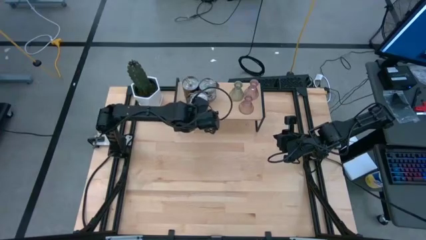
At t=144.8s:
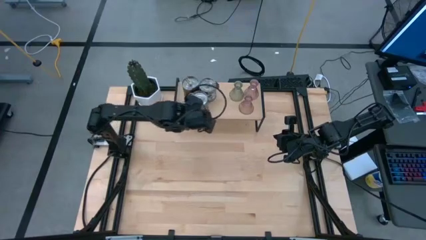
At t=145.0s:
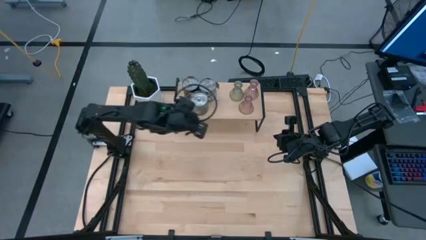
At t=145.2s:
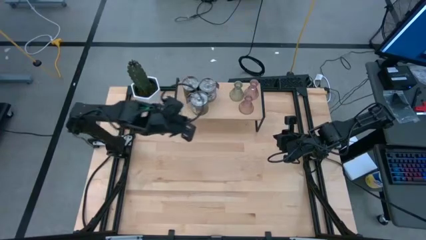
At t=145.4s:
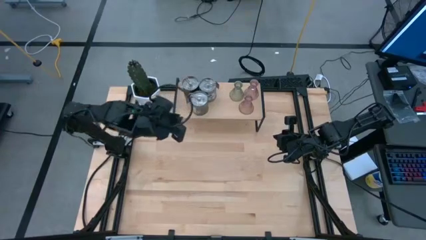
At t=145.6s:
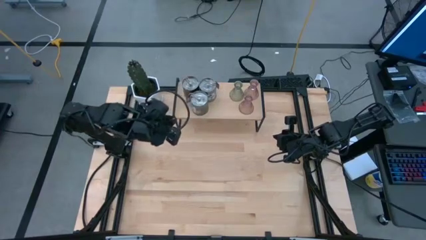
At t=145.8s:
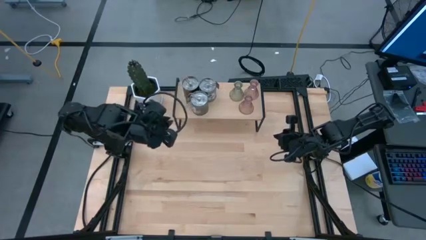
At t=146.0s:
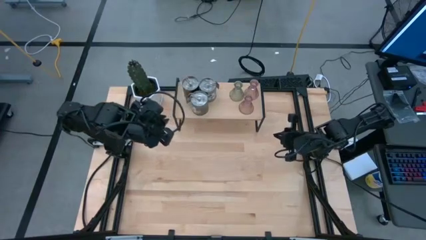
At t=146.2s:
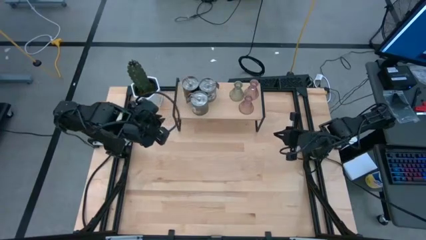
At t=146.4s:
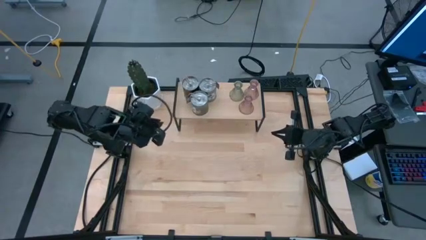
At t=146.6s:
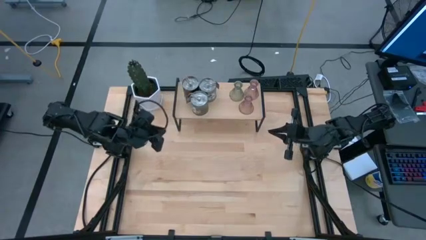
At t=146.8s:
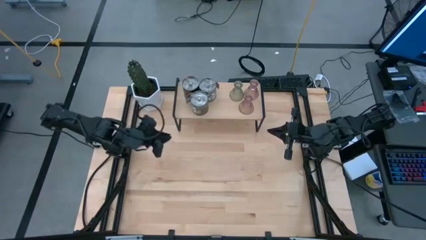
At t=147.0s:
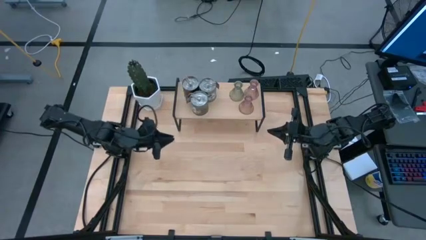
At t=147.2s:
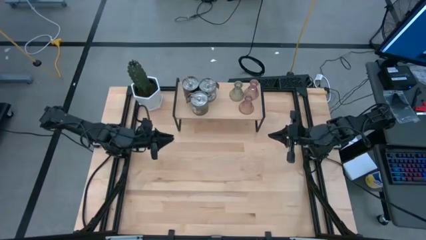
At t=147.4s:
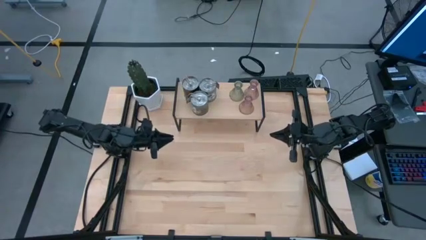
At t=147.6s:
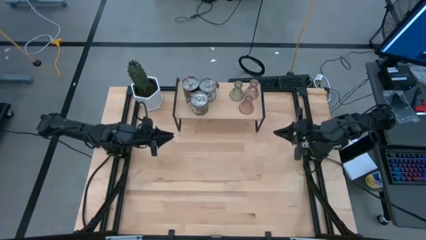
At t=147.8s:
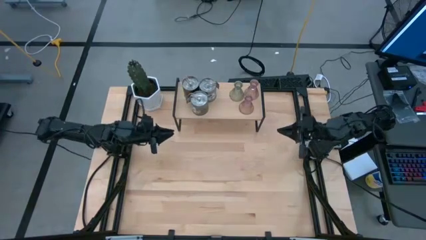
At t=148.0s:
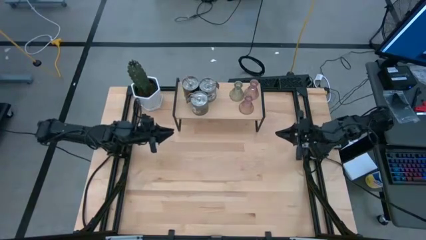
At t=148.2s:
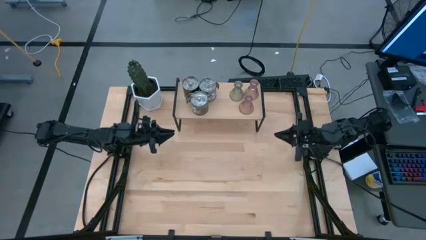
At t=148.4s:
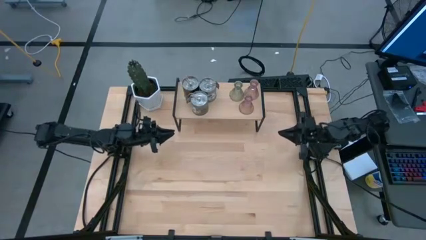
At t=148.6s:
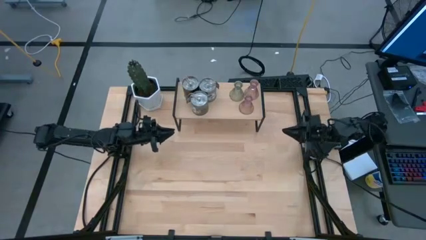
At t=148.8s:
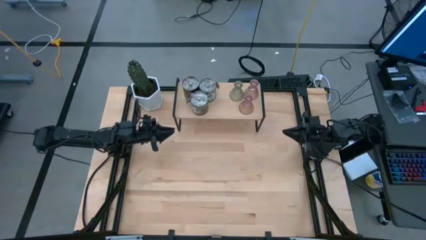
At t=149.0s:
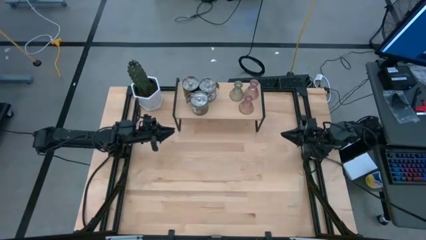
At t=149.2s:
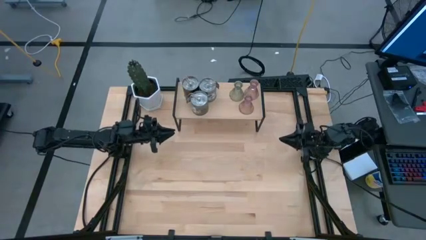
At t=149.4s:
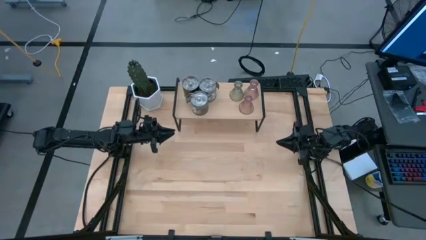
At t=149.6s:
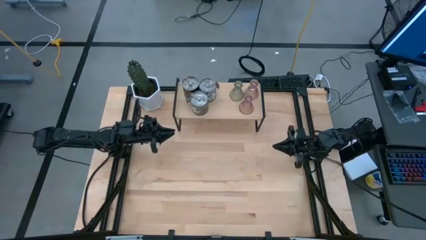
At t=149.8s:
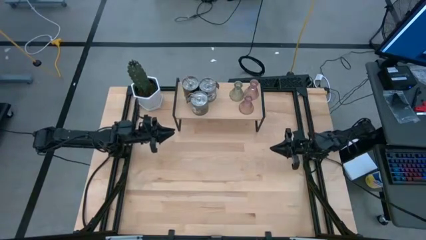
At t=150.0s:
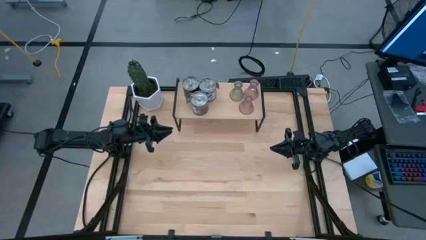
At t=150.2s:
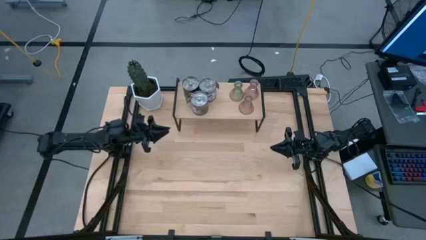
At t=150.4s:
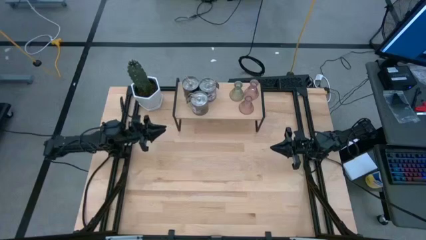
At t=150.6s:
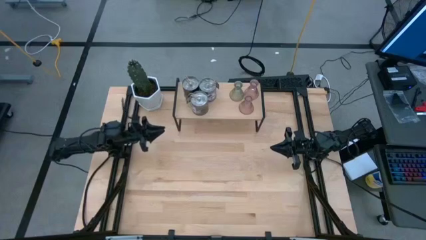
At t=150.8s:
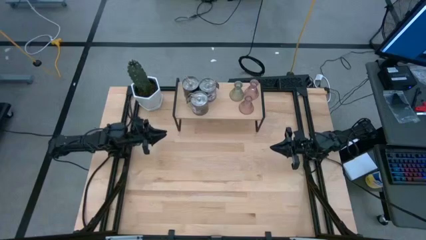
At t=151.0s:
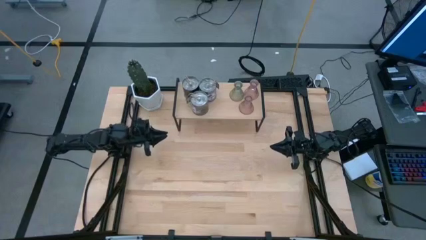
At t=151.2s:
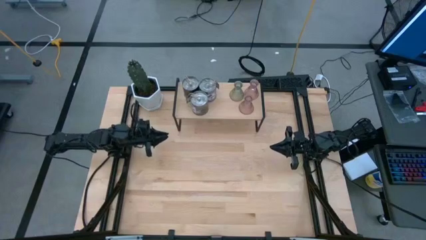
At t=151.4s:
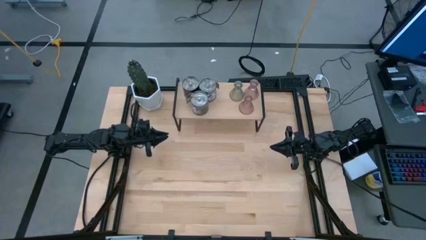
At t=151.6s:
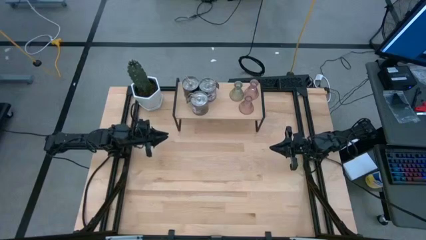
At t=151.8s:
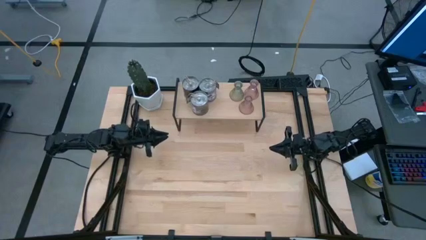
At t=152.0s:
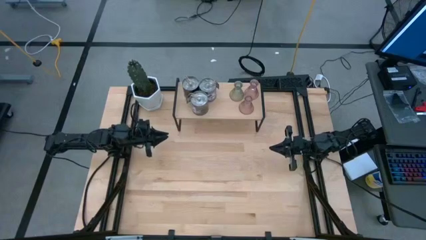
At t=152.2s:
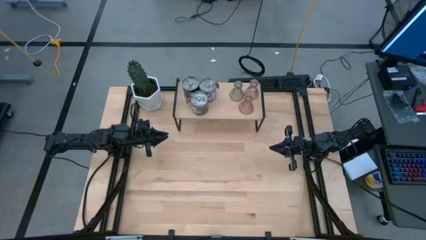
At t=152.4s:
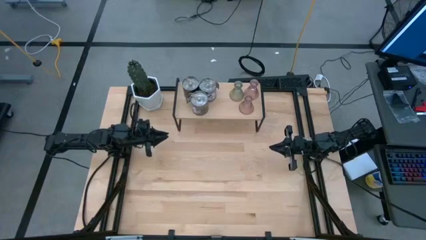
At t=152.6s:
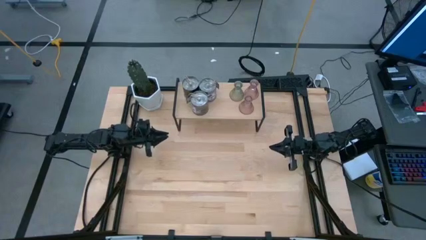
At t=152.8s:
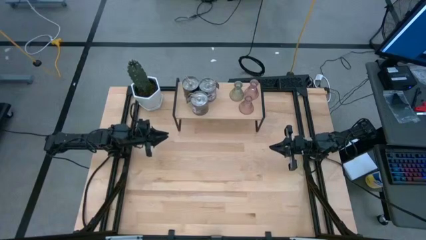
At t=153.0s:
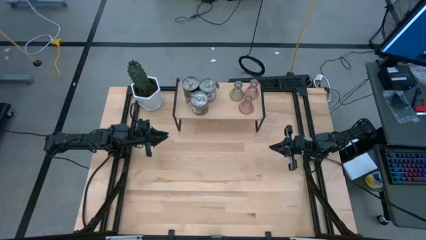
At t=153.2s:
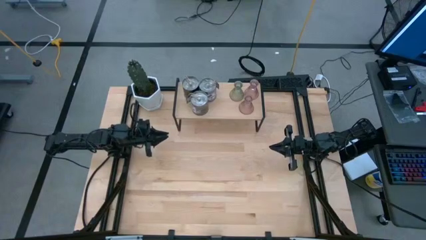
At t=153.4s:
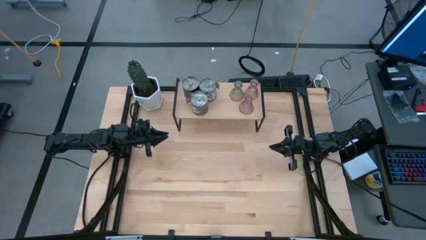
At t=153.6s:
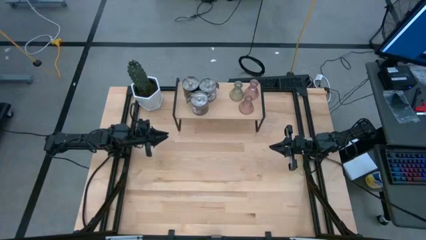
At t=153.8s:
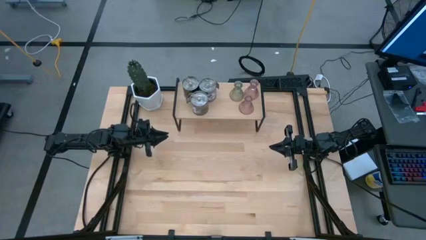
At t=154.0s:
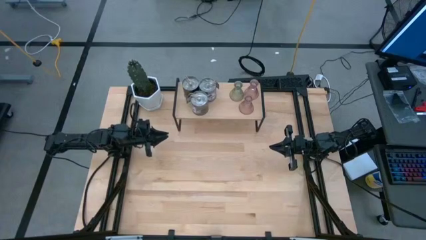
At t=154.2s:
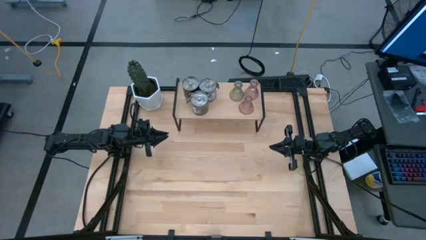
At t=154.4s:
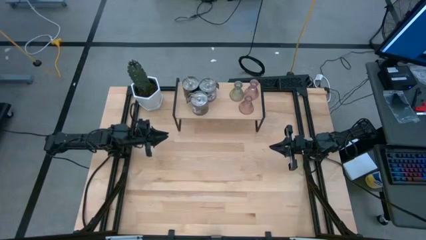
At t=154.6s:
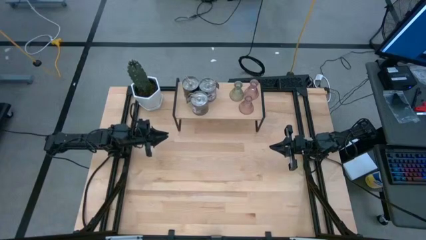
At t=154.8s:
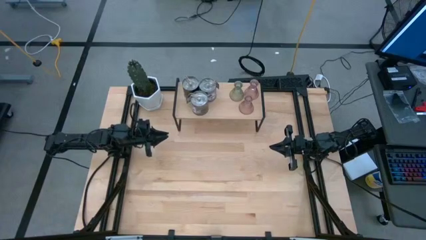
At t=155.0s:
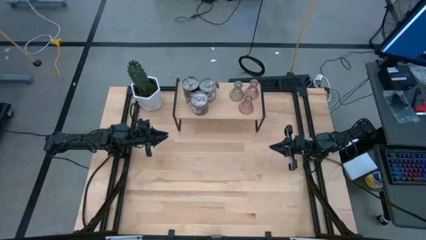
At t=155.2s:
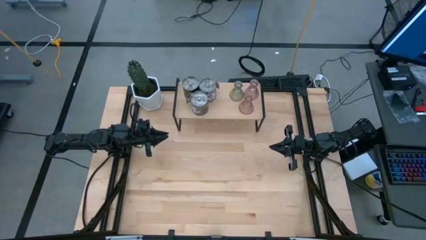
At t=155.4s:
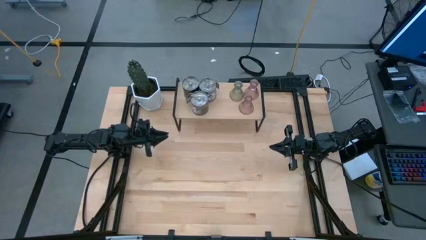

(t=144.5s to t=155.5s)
Task: Pick & Place candle stick holders
Return to Home Position

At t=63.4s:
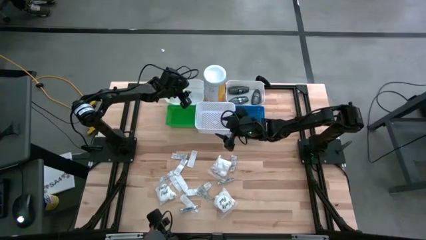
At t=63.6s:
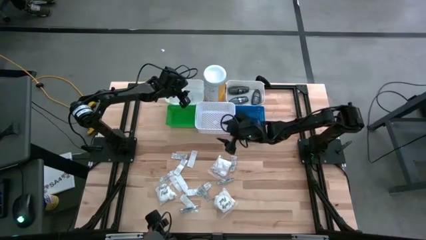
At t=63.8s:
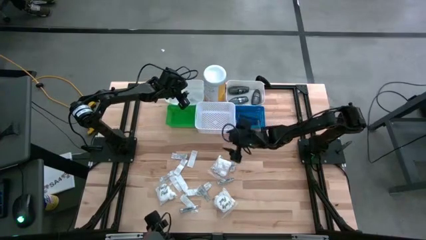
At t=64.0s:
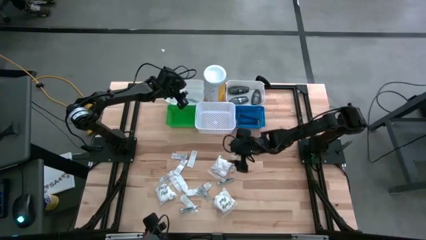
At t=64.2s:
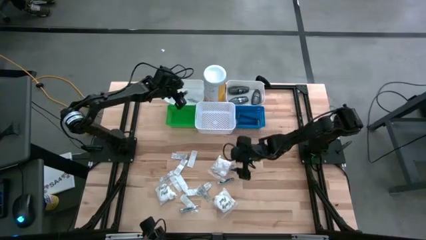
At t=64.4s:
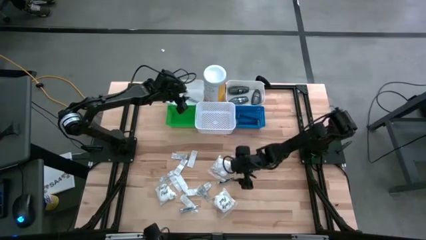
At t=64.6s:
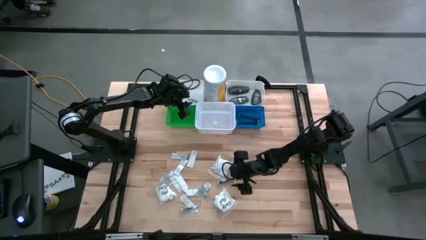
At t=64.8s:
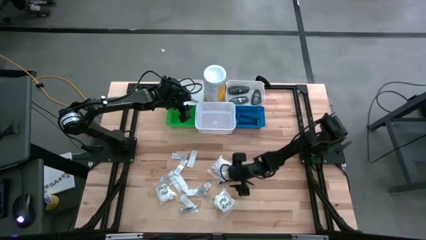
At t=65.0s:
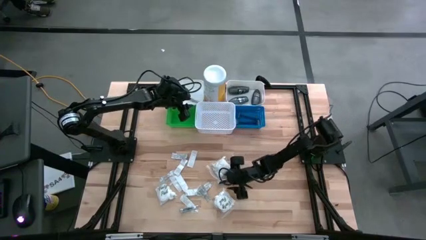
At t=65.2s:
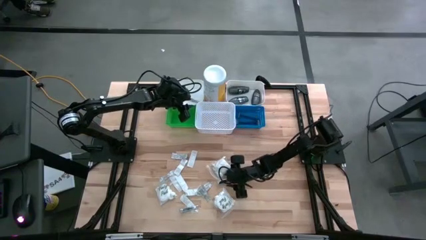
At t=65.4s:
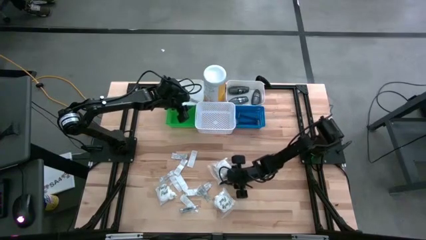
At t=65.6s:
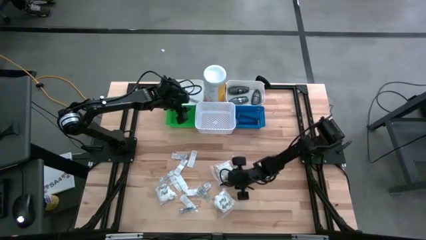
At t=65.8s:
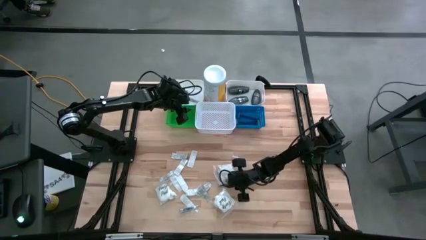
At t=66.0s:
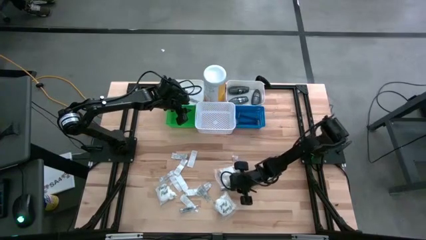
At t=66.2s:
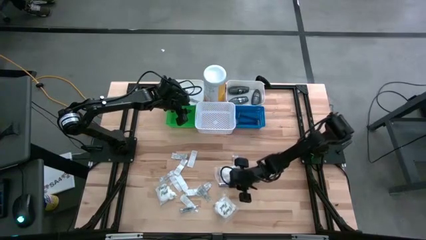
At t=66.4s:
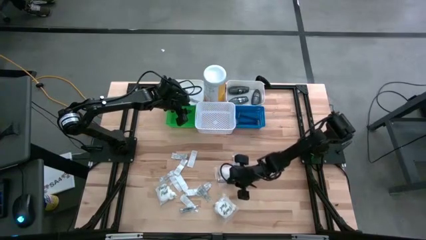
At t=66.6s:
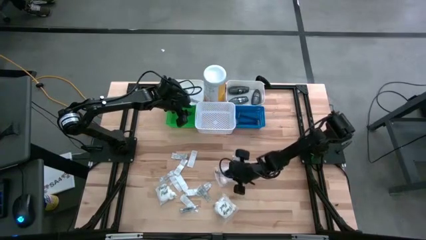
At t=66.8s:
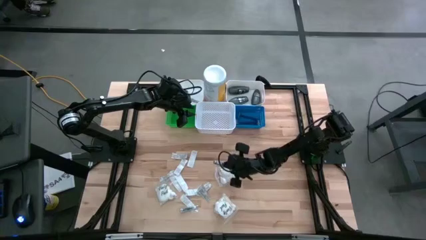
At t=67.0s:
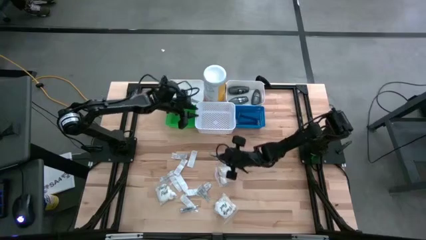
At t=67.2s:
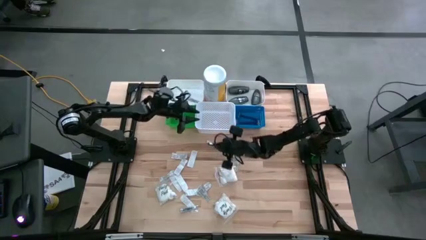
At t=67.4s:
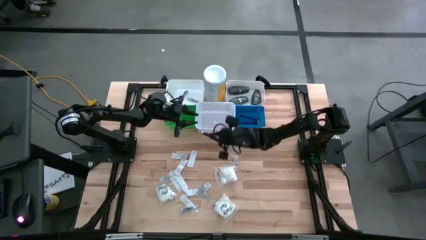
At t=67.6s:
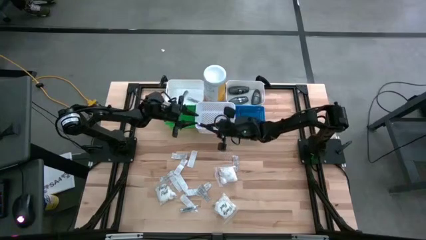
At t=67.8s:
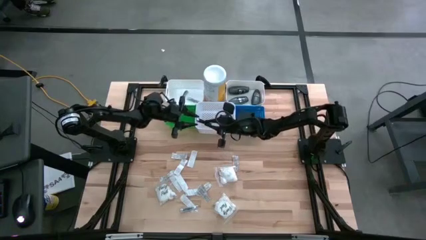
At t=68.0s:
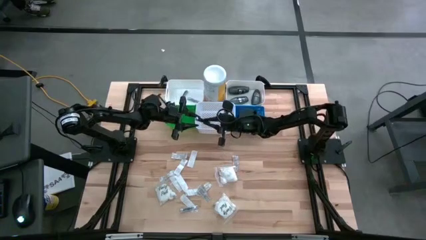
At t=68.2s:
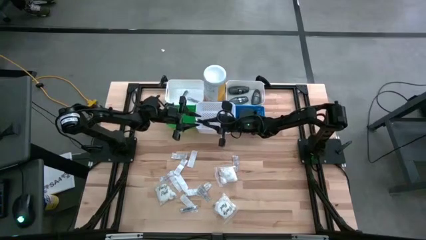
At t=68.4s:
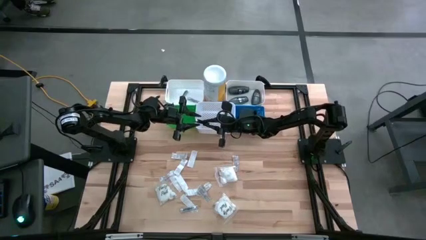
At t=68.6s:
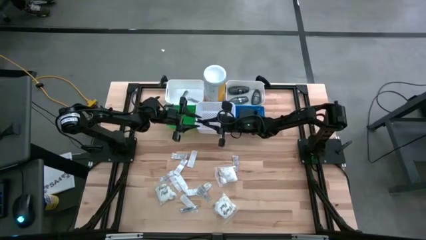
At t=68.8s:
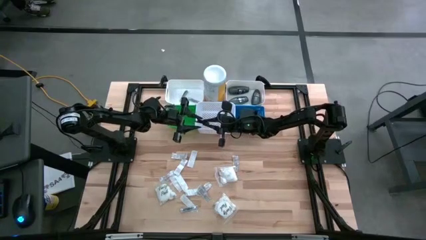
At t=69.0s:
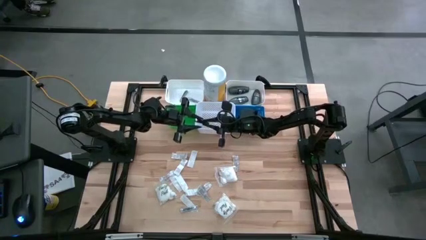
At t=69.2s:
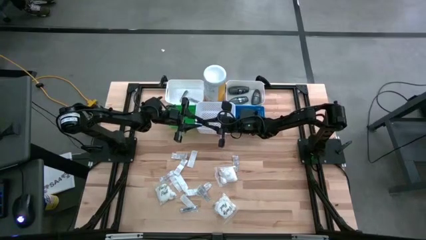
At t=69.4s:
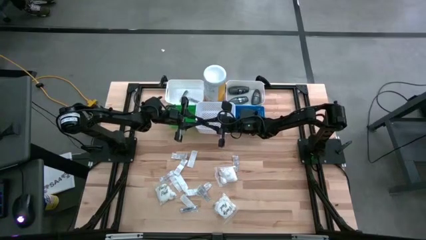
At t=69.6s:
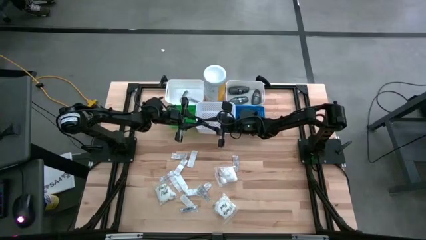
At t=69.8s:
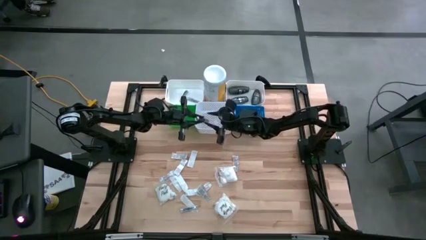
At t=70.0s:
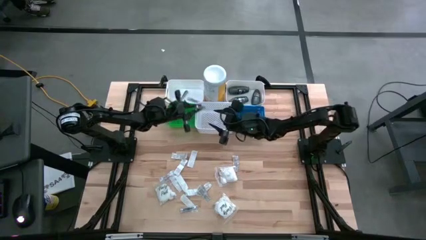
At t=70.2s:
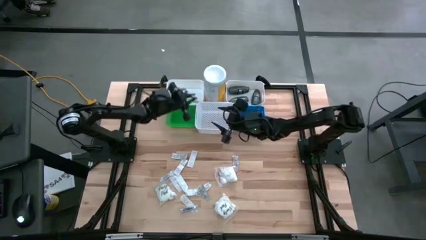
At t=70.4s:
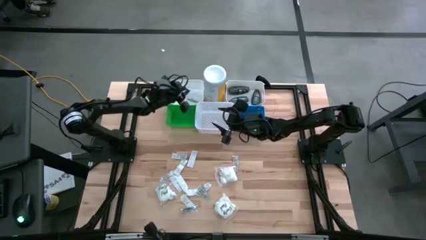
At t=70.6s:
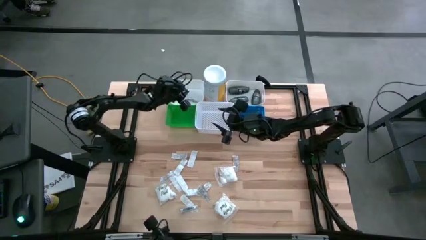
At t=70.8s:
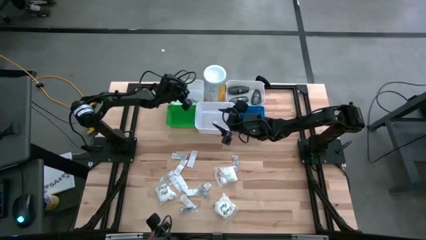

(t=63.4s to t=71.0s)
Task: Pick & Place Travel size toiletries
Put the silver nail cutter into the top left white bin
